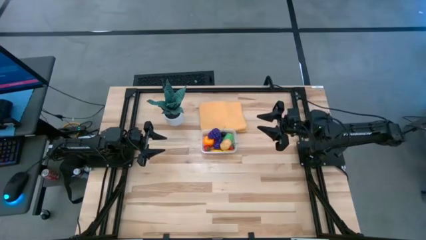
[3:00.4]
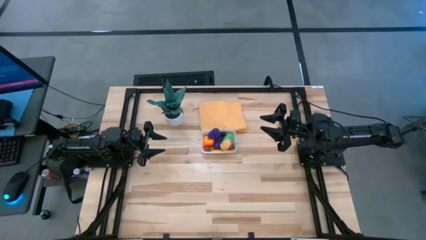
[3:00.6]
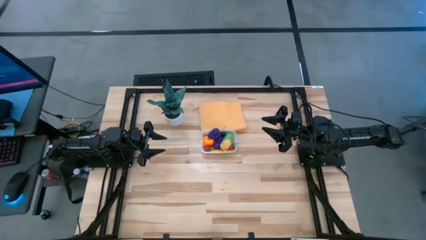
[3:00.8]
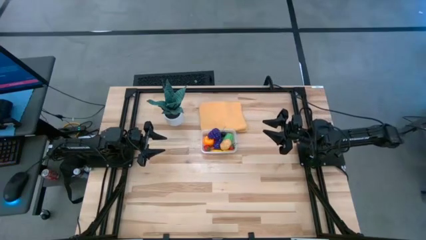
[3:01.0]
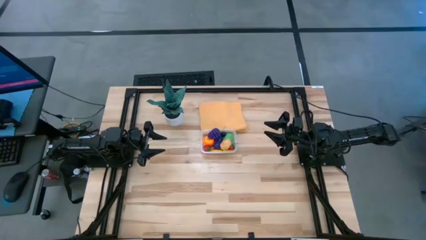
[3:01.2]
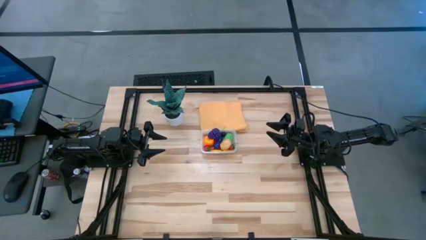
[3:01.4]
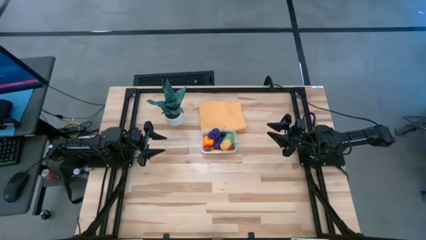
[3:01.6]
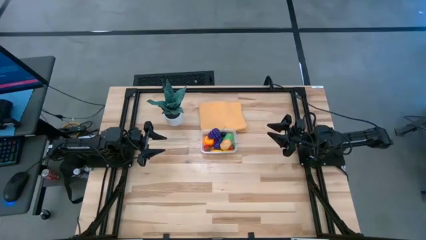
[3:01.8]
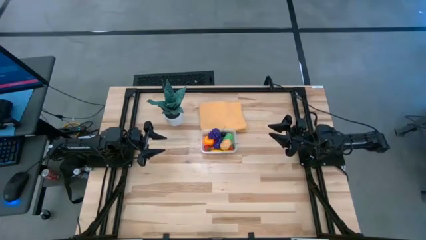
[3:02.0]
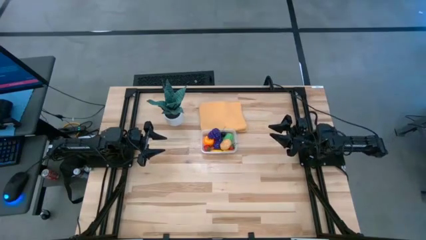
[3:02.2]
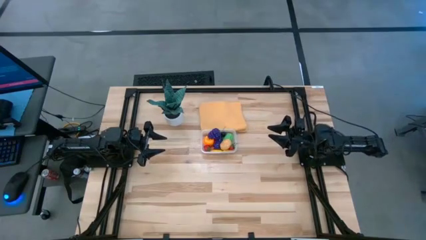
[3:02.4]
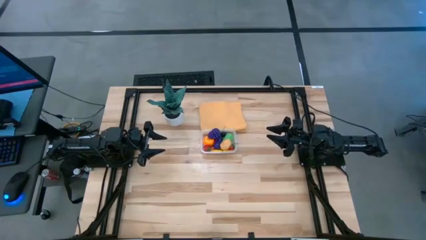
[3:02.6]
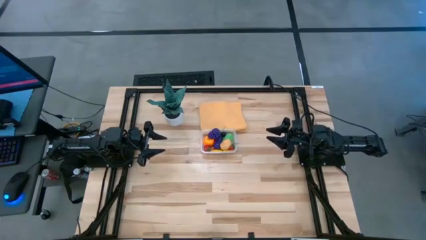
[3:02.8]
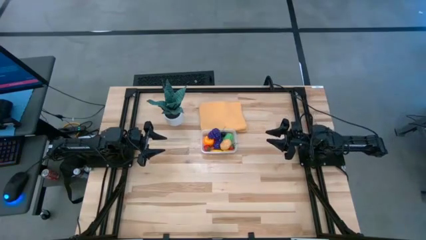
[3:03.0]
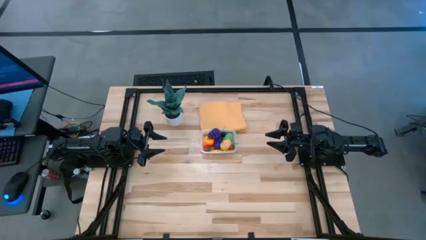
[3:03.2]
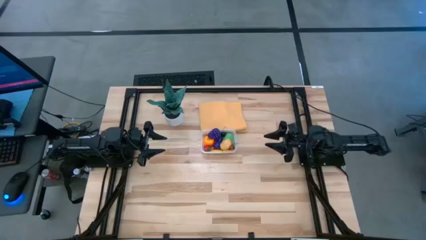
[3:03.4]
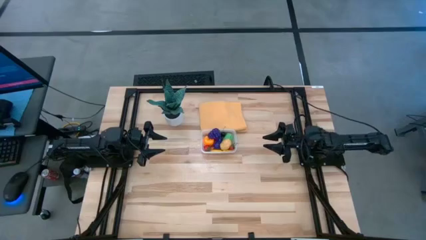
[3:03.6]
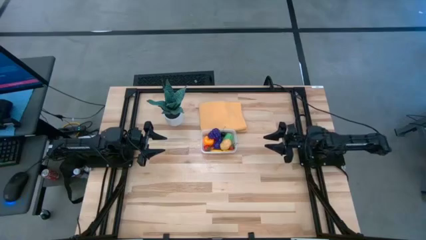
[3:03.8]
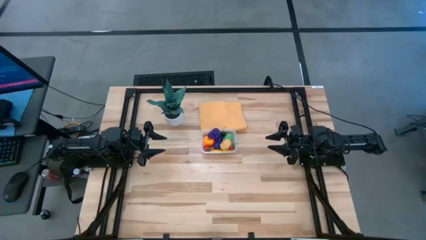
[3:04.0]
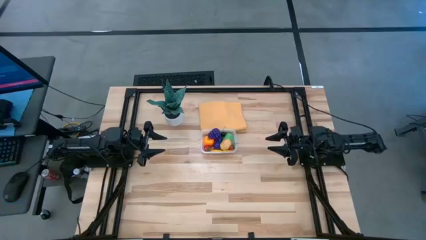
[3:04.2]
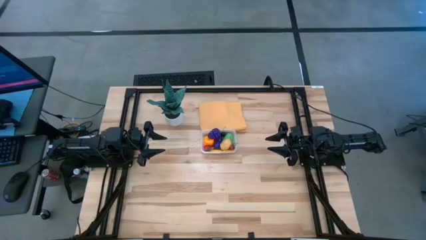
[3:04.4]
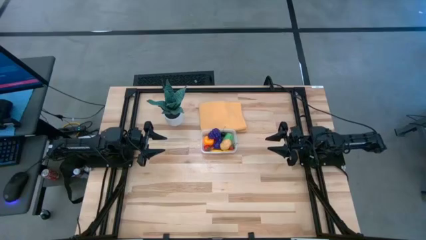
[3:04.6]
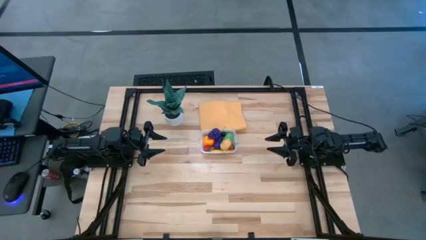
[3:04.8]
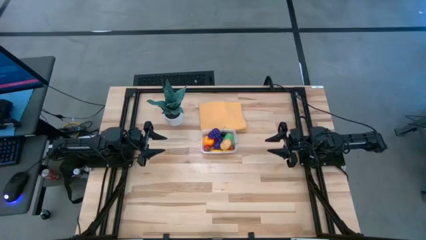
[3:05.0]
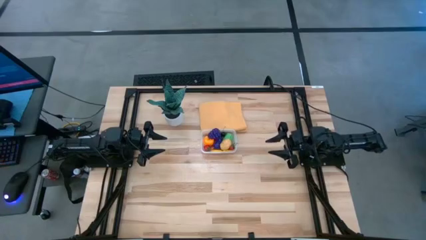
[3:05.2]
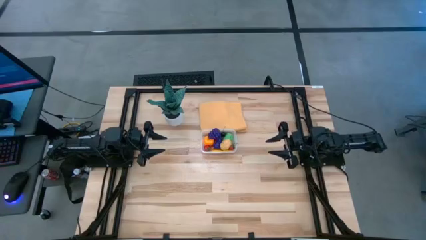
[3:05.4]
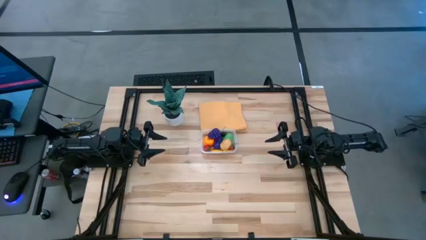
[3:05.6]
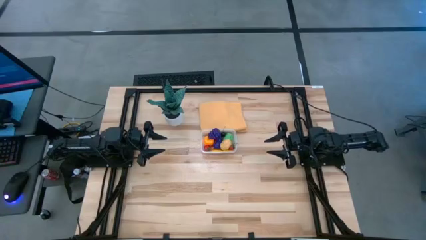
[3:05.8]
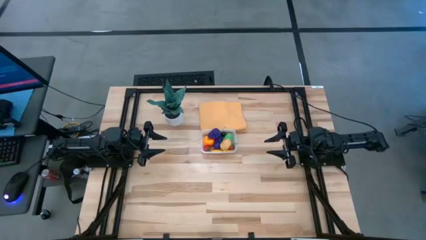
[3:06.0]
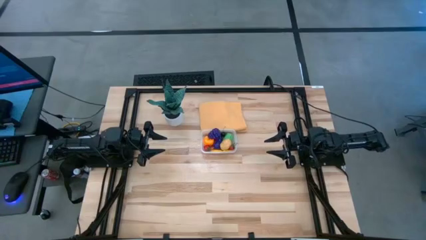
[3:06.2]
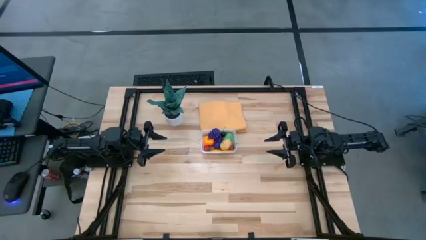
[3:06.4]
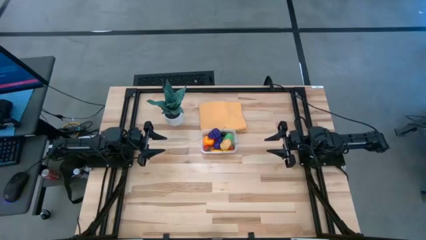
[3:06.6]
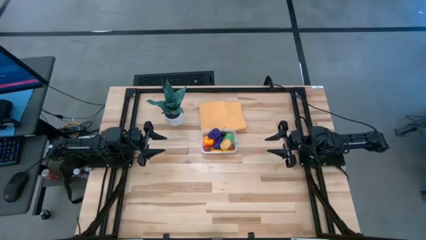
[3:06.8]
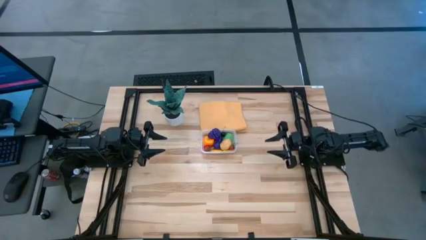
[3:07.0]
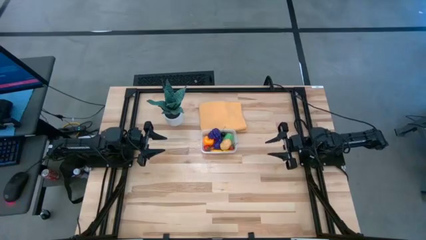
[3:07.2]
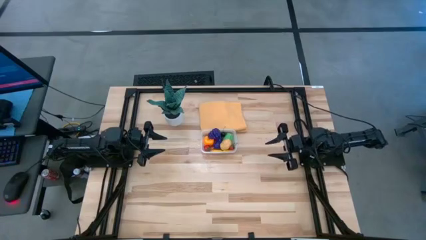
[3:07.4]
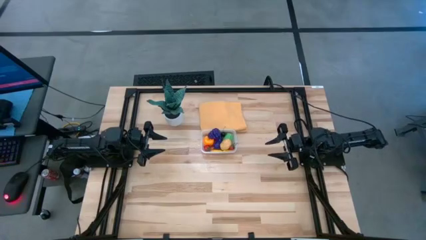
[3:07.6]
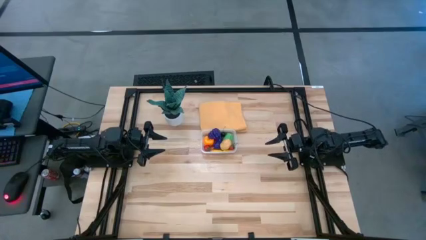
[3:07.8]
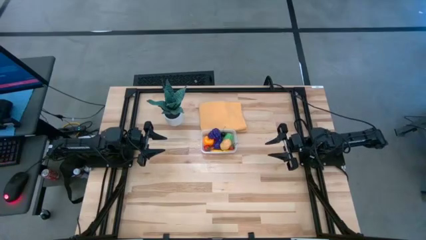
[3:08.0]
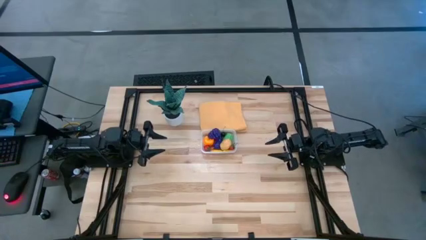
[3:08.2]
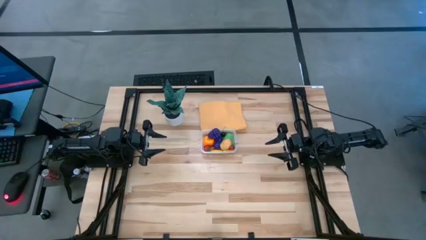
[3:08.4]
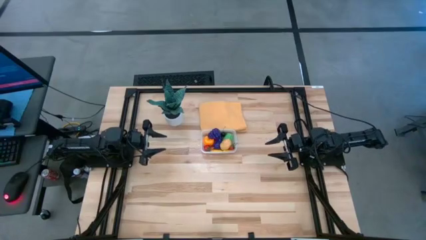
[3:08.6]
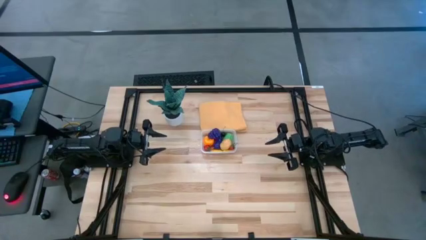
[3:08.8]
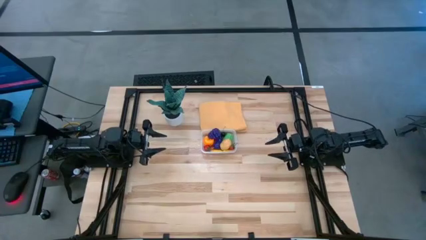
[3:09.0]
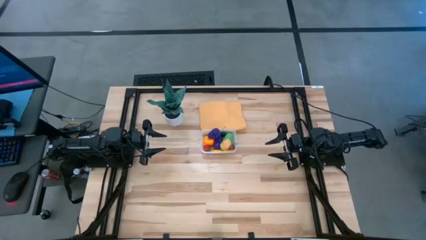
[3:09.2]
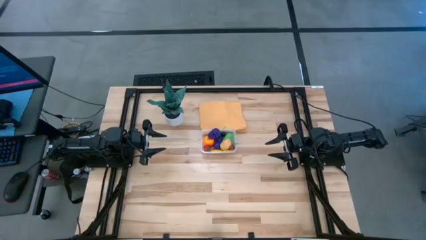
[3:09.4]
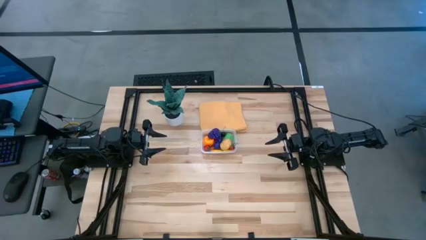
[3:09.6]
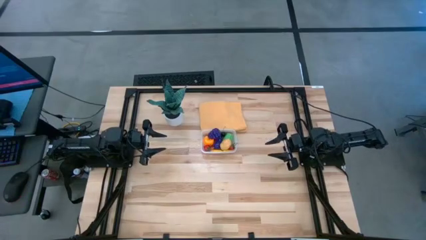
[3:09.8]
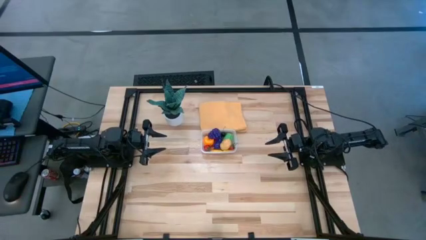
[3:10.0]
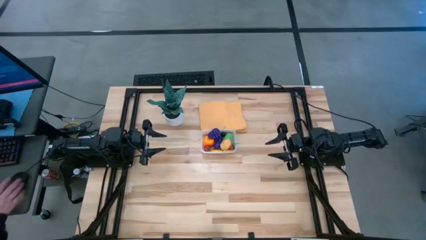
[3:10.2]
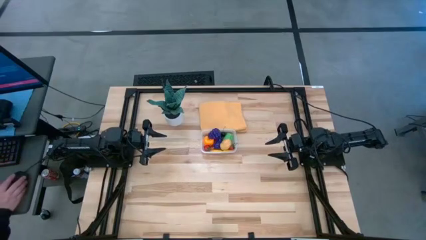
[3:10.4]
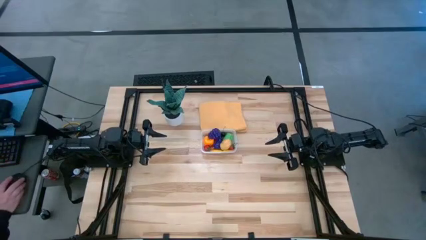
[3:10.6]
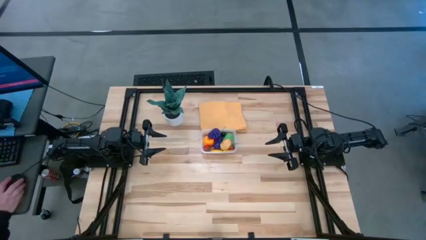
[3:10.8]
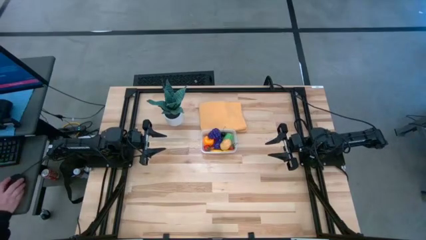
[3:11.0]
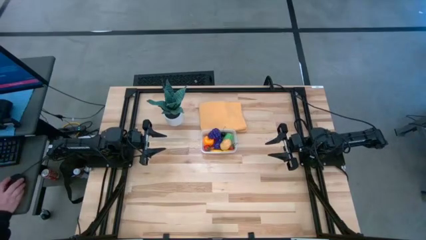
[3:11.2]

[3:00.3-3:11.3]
Task: Pick and placing Produce into tupperware
Return to Home Position

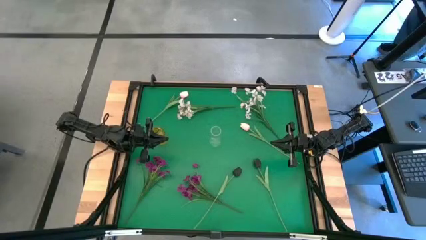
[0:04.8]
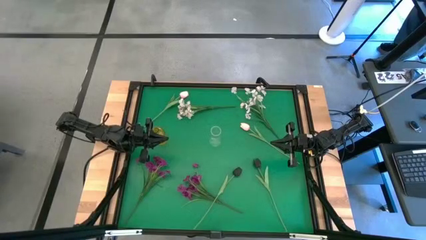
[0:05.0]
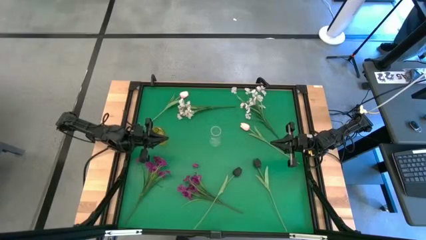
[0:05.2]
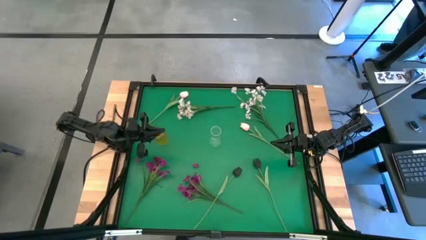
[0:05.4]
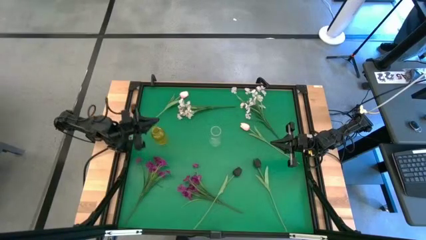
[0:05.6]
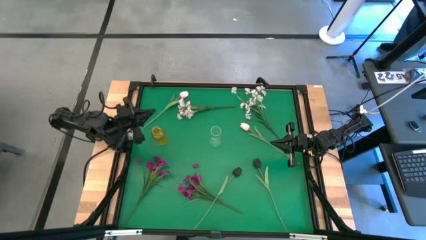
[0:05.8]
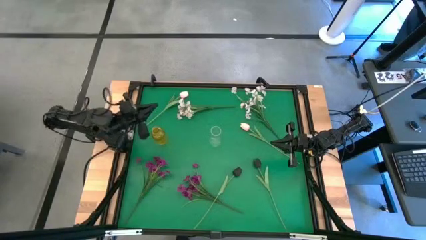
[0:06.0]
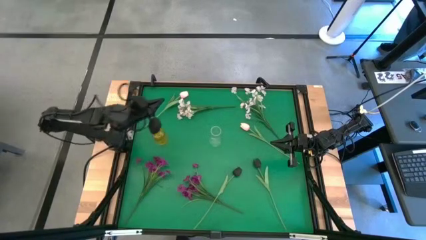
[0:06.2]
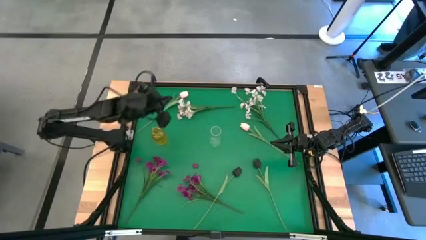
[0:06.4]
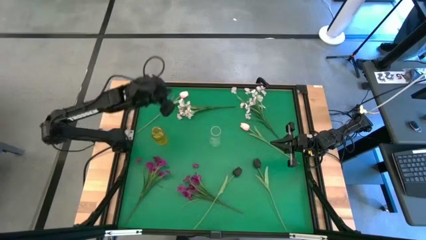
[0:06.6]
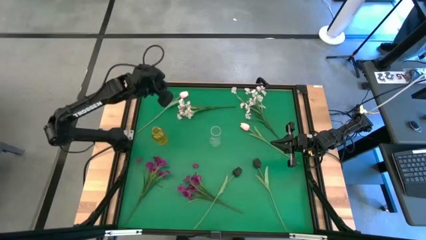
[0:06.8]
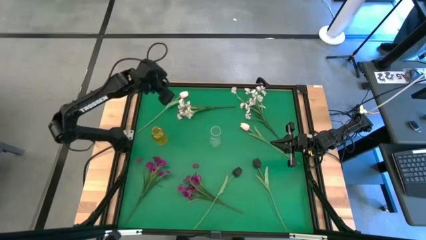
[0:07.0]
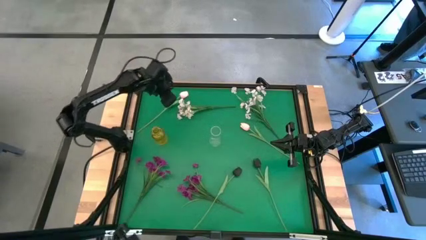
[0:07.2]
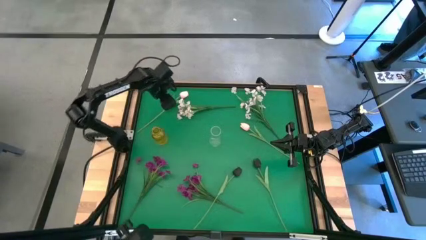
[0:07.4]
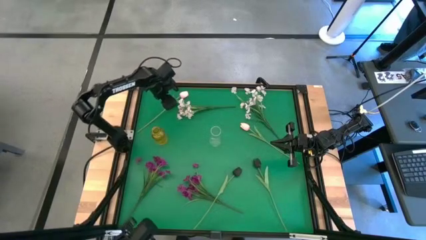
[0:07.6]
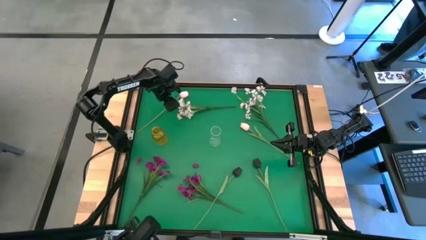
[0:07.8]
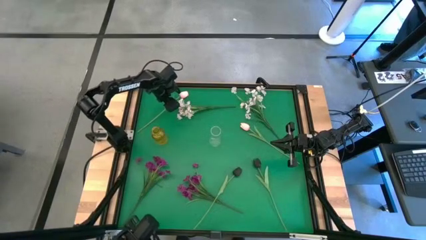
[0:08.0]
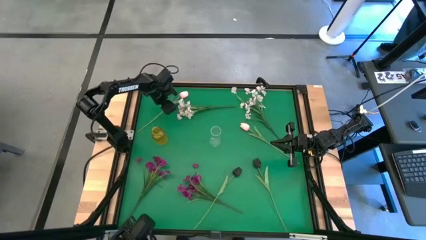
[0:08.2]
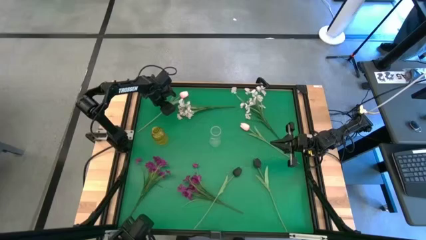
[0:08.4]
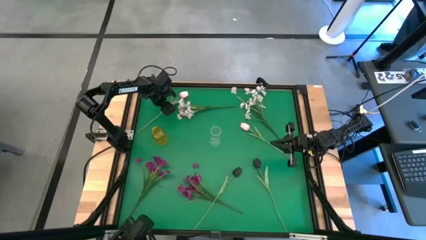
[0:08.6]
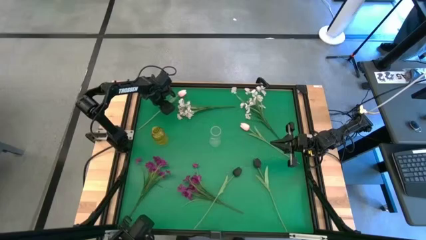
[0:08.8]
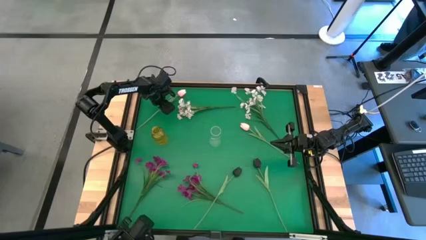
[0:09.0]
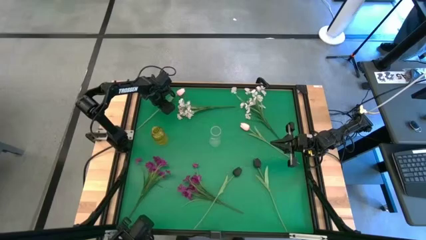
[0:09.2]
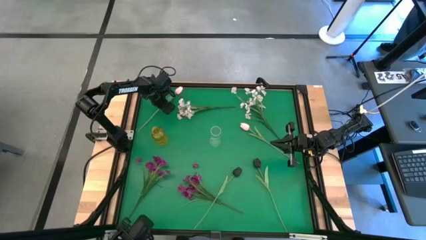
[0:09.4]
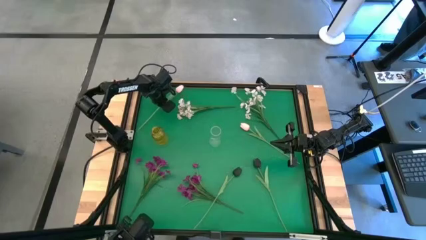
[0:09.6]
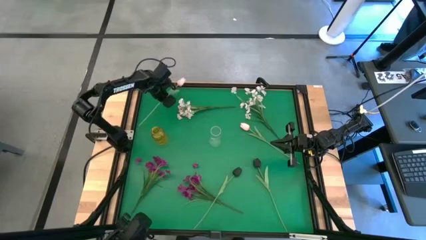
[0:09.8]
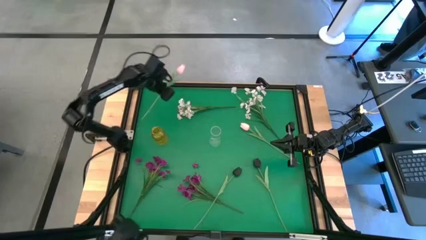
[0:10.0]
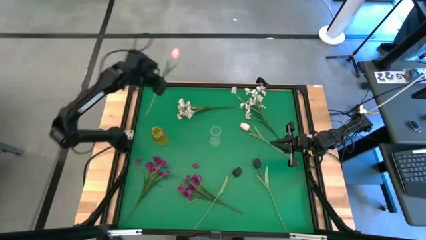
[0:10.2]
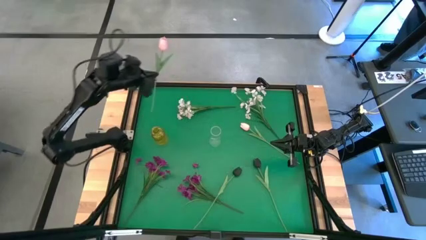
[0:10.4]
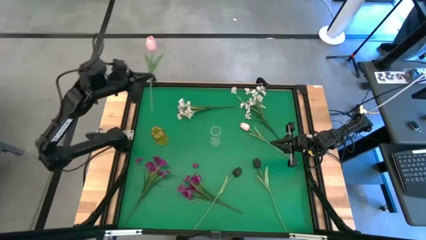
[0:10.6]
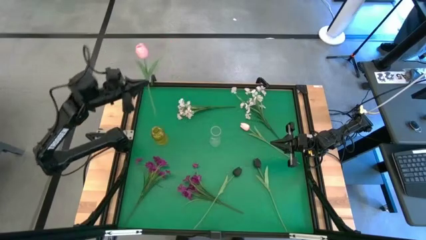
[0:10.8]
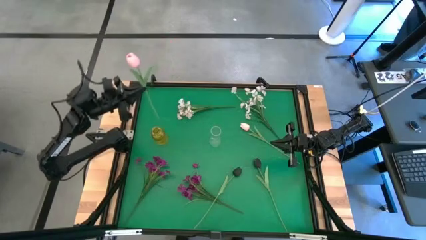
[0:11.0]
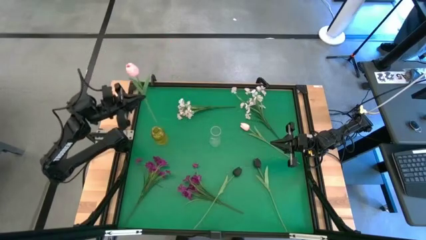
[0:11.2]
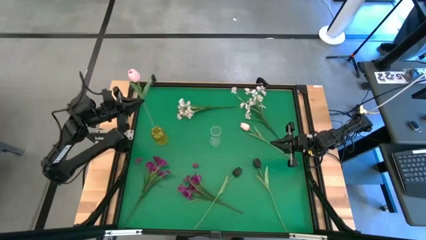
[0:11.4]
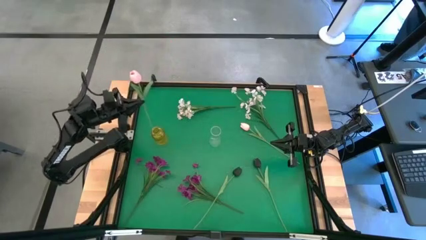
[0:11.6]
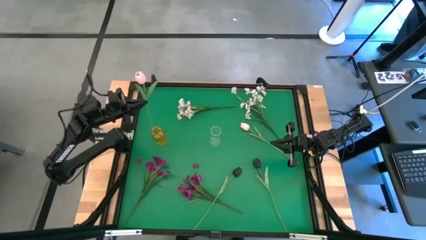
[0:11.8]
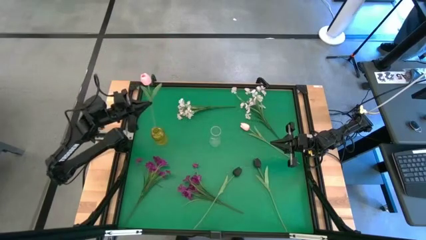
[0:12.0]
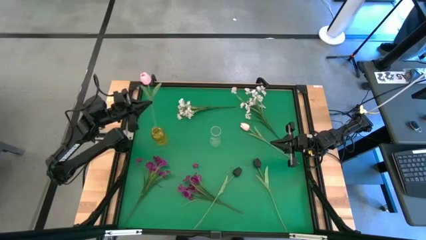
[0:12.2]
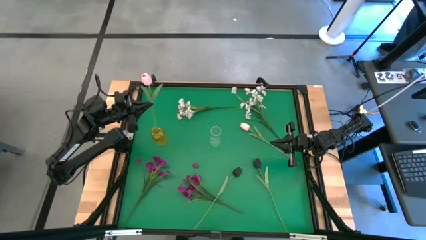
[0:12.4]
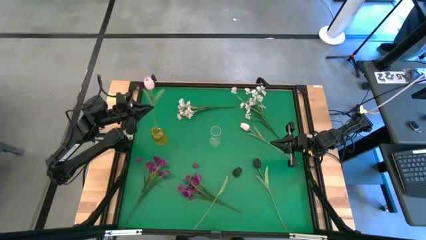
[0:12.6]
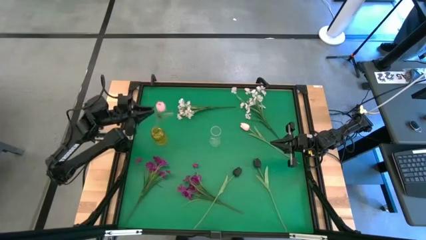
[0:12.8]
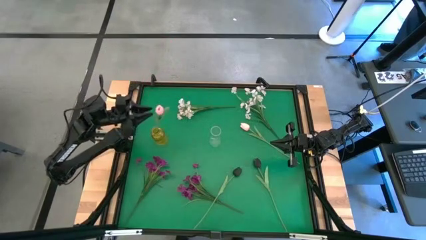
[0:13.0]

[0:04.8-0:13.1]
Task: Sort flowers into vase by color
Put the left pink flower into the yellow vase
